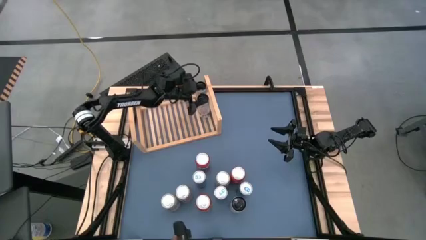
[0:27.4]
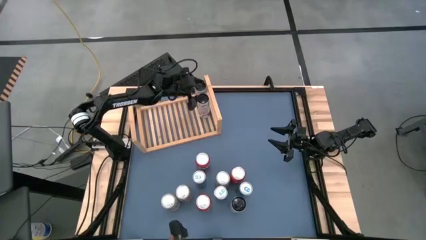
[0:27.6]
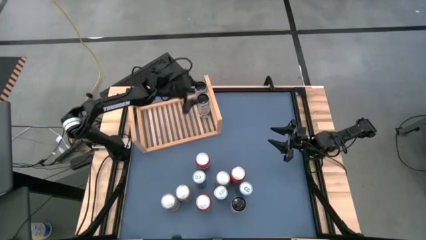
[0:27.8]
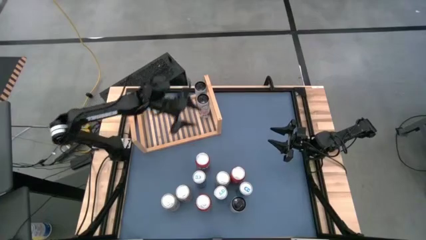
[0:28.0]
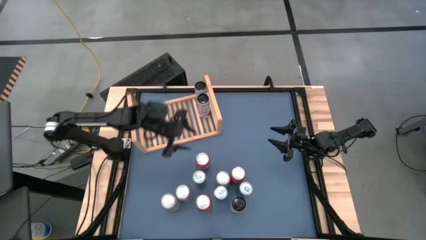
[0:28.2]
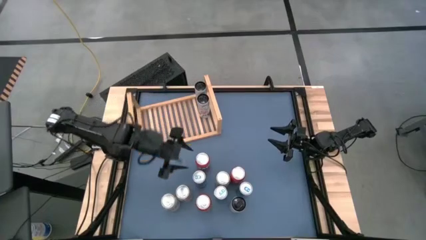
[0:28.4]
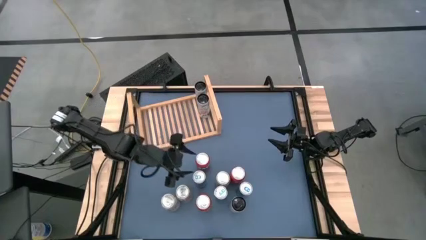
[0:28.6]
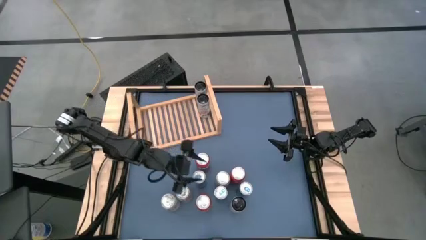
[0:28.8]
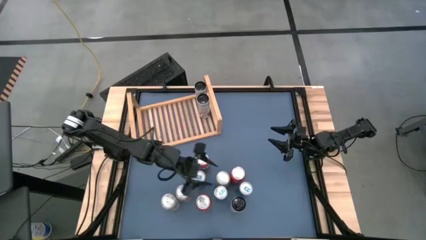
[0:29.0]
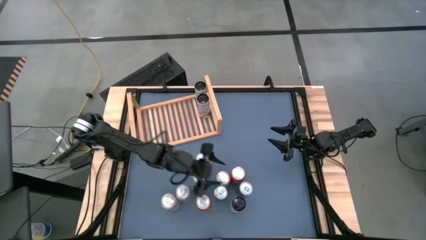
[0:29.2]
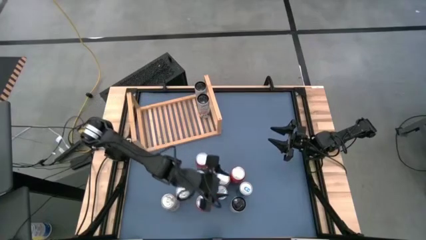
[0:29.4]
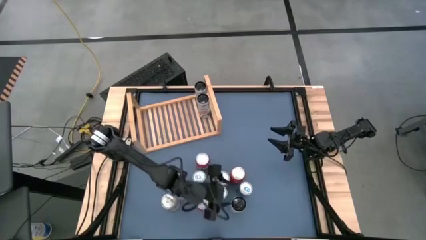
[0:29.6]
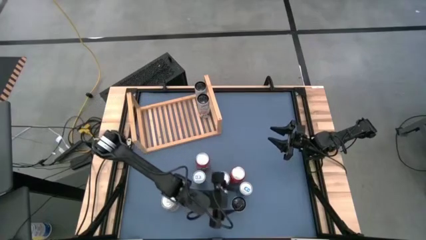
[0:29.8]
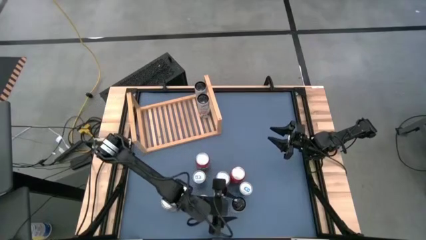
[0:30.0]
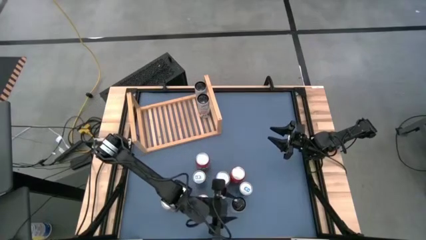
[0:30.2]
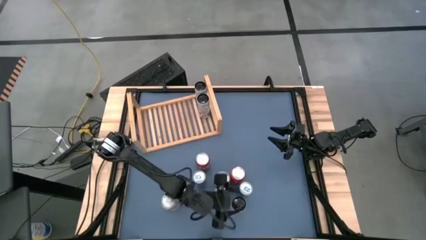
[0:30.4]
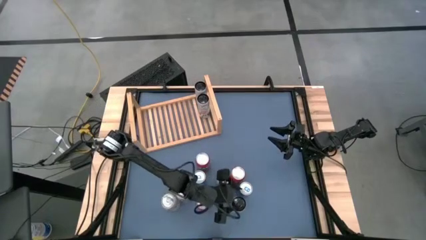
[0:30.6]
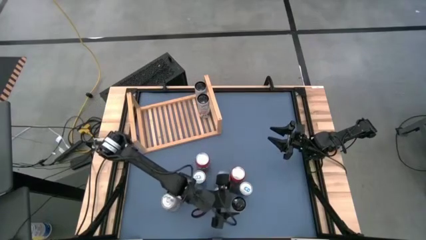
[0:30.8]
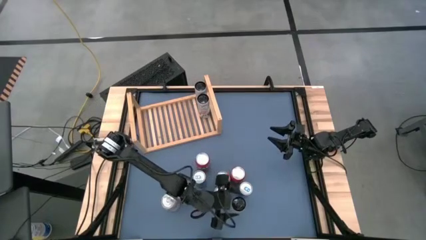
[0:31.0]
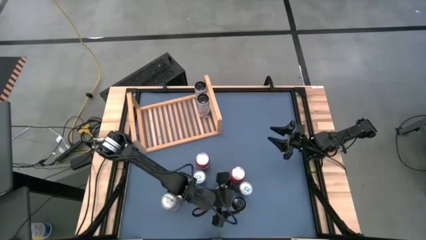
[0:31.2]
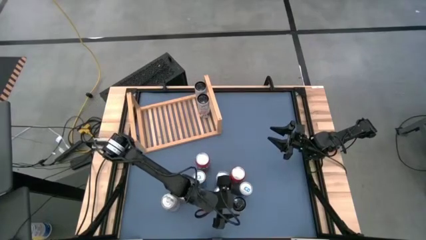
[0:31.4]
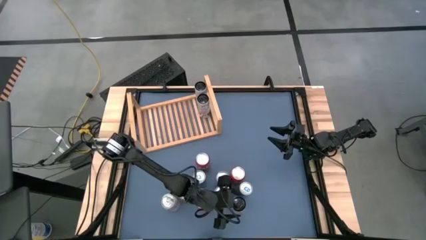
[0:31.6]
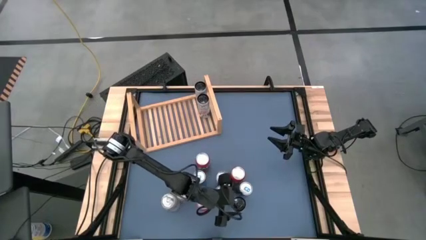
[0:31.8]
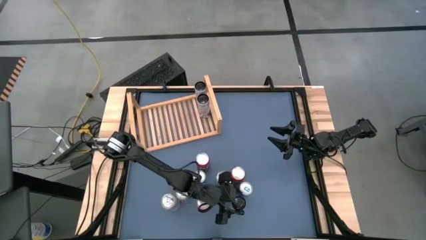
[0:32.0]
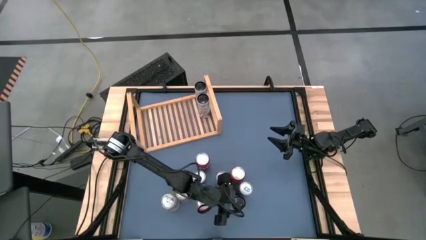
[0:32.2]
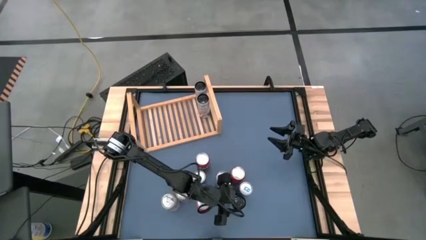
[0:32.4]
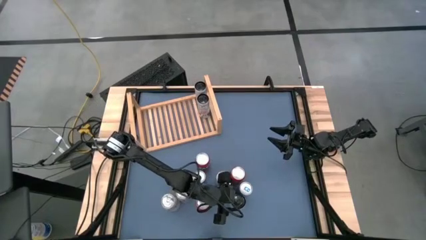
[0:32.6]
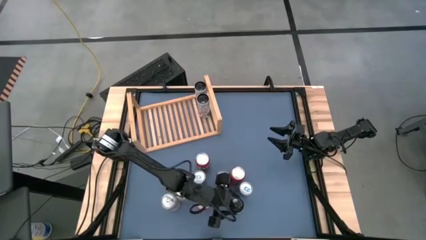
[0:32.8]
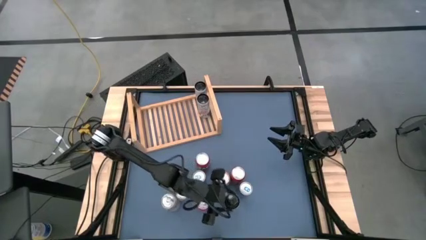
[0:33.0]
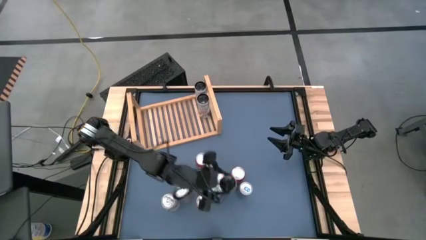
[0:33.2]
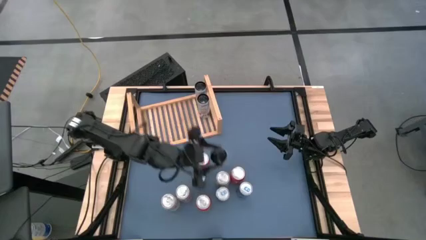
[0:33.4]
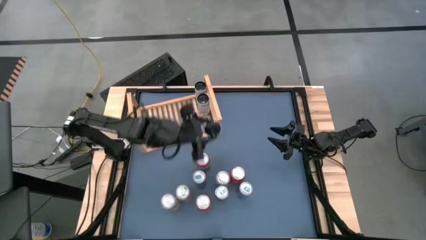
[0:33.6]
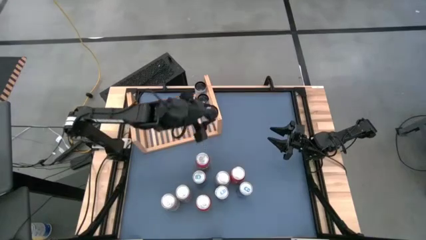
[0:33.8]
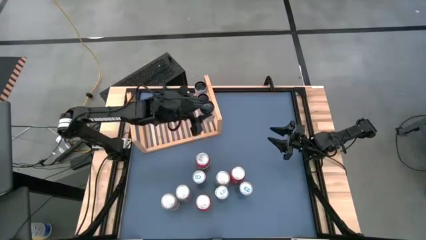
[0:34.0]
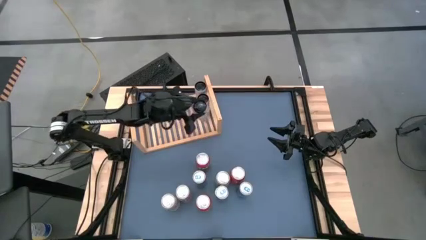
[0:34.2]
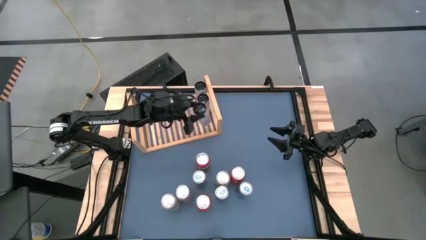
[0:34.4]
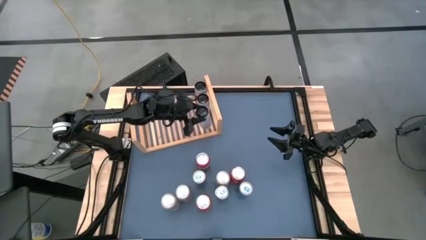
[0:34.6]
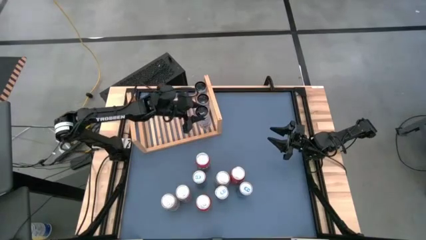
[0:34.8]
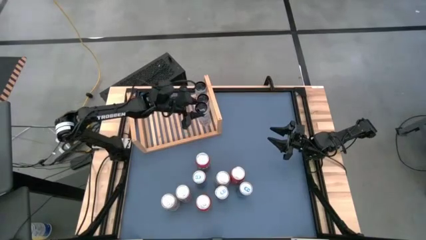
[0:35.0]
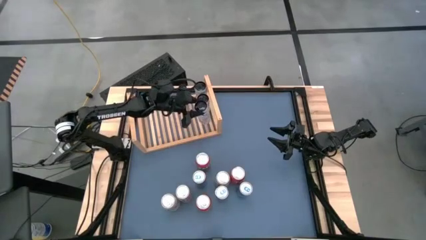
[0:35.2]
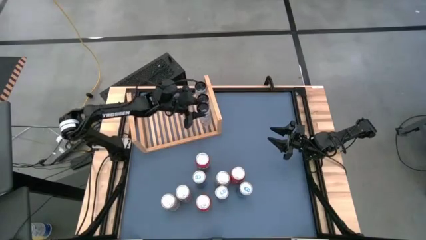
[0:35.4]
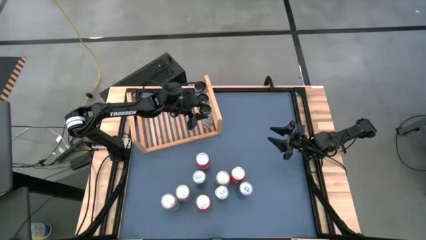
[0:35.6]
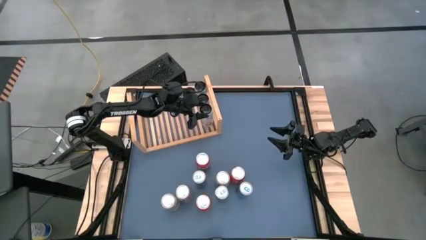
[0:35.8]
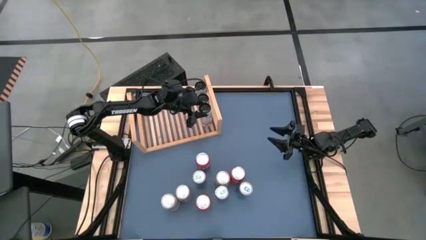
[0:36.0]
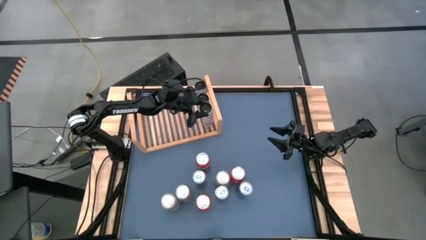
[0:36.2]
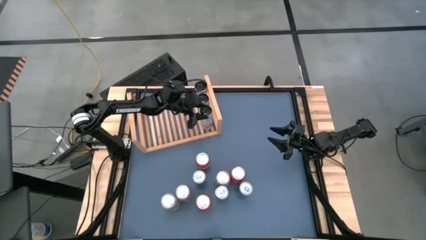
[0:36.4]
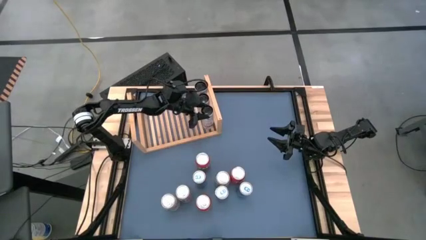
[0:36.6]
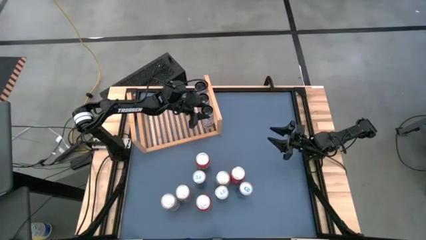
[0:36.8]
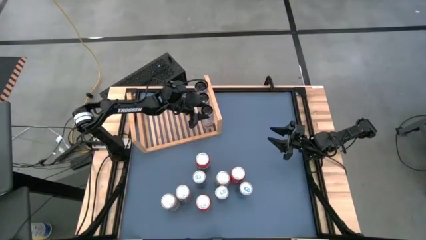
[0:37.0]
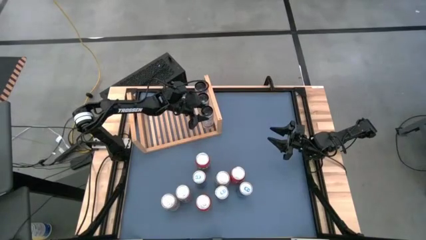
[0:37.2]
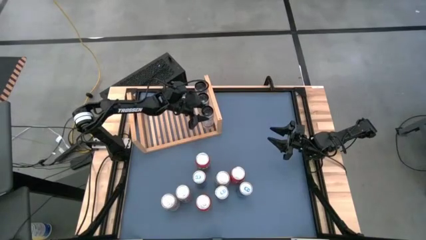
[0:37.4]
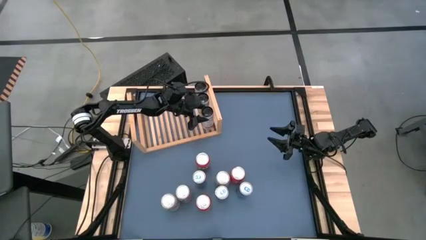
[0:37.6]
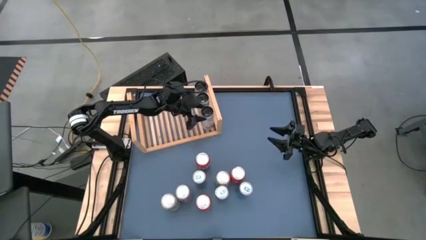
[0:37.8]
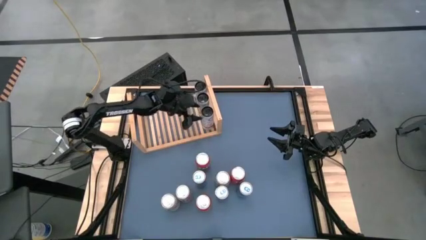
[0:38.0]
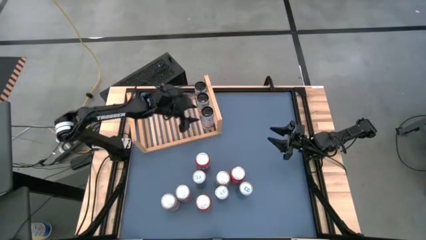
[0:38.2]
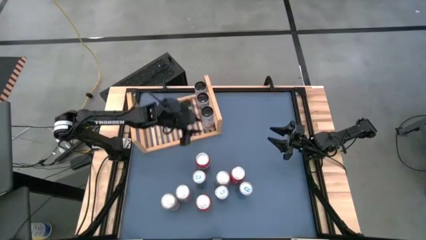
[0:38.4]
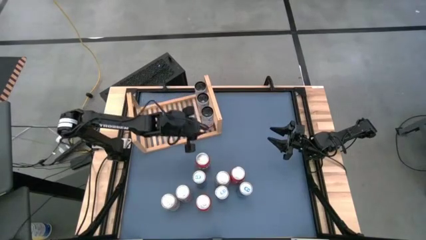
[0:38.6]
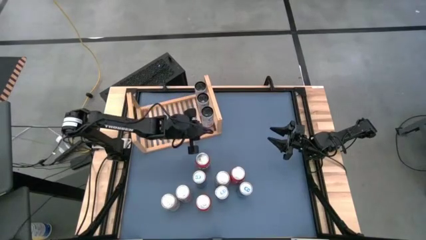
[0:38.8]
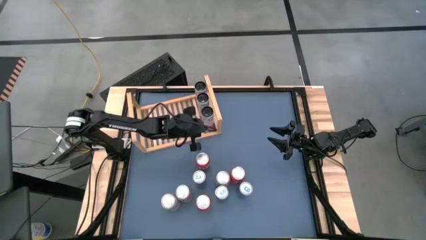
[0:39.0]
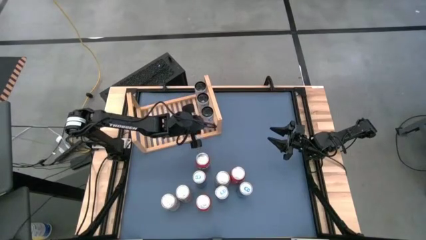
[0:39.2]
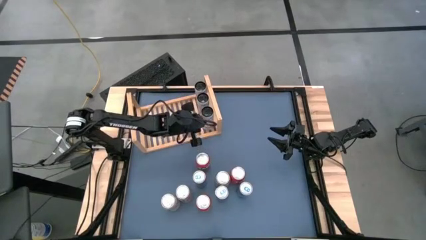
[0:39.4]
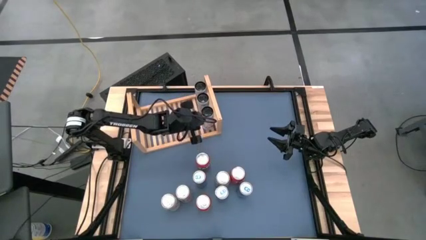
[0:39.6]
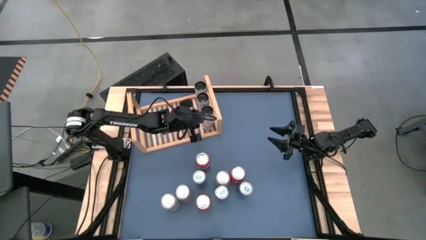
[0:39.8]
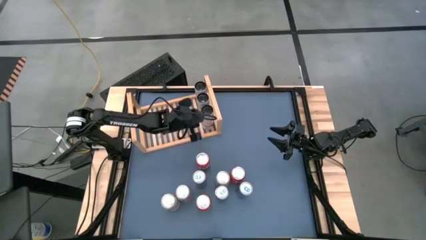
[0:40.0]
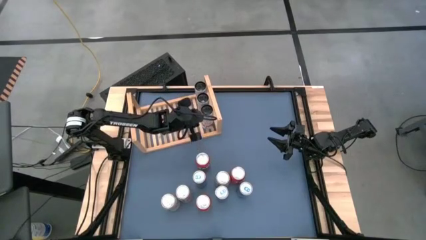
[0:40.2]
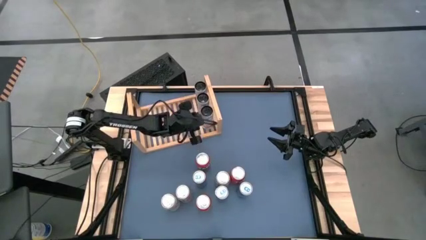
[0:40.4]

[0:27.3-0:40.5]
Task: Place canned beverage on shelf
Put the white pink soda can on the shelf aligned with the other white pink soda cans

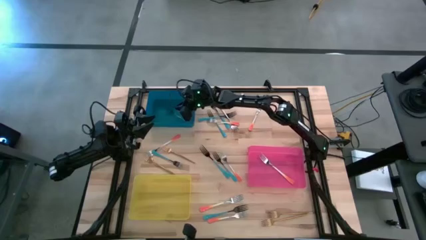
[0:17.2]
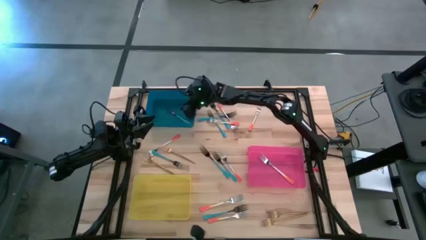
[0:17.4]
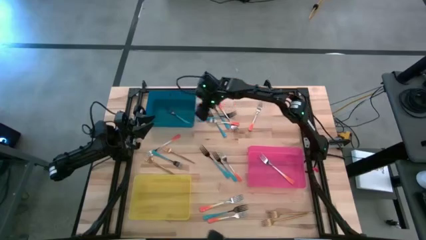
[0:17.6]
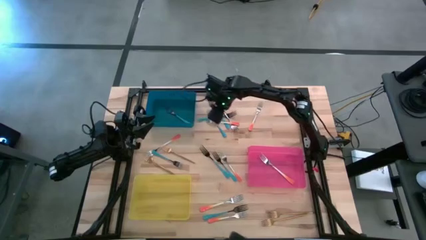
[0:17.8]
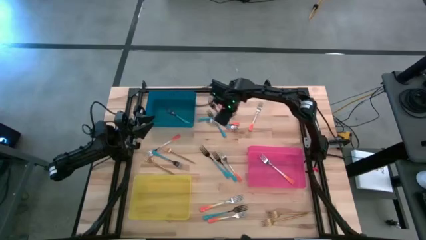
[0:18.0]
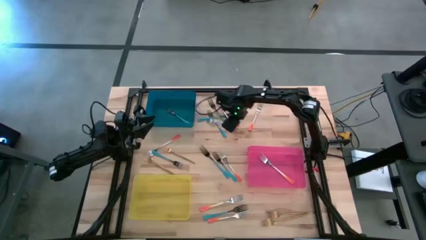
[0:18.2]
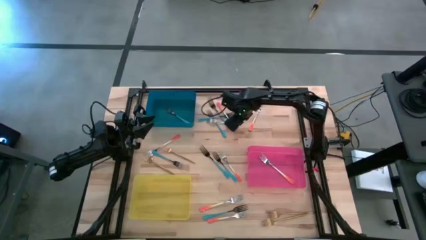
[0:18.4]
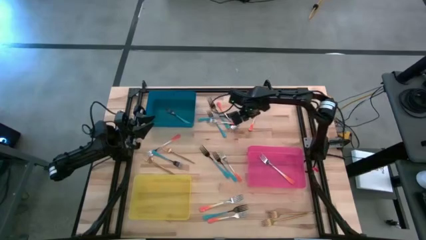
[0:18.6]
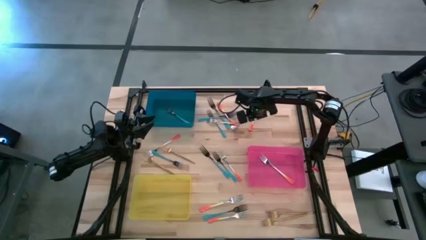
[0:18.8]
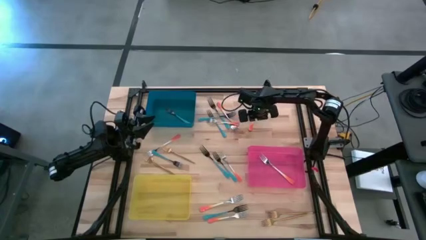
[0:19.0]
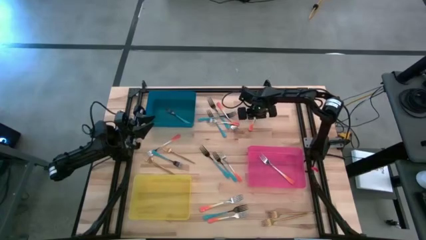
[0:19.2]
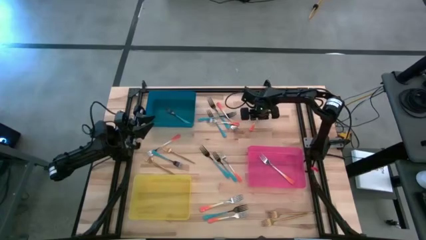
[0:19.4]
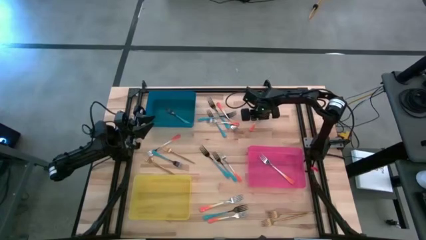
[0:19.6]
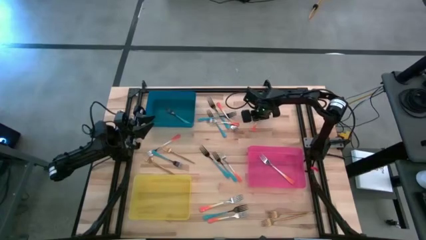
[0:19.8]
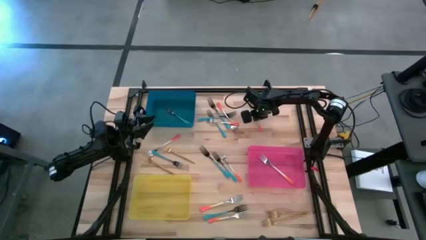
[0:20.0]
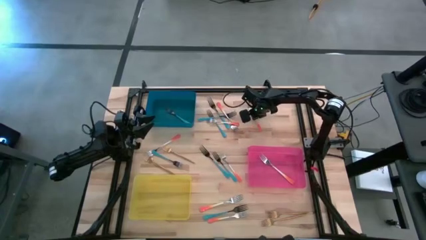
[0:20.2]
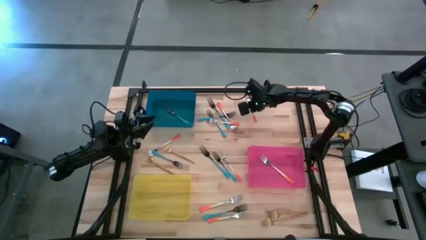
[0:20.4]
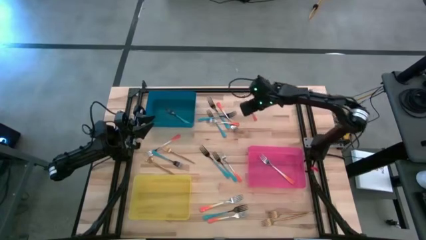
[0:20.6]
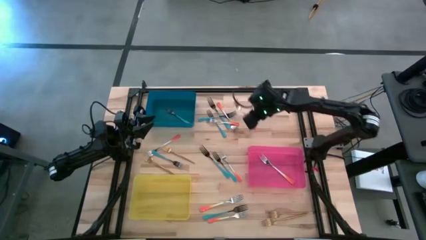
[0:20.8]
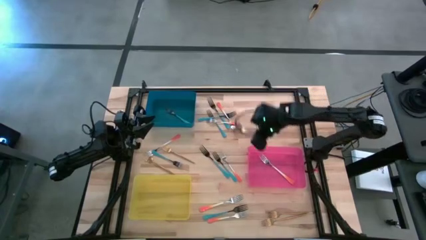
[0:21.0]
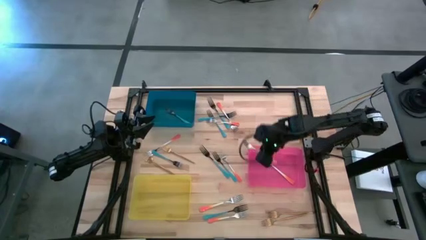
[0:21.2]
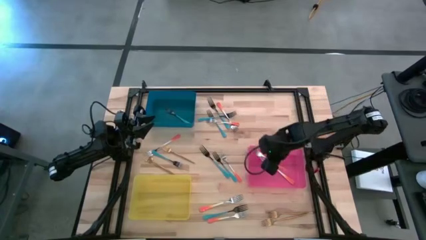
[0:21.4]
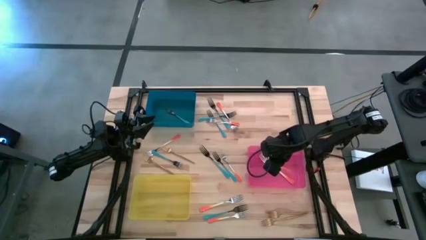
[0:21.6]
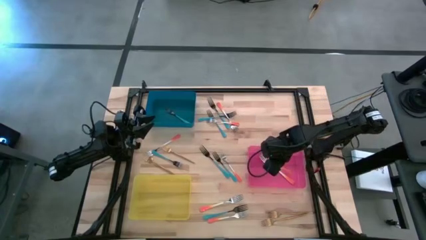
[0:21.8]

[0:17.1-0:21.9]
Task: Sort silverware by color (type)
Put the orange fork into the red bin
